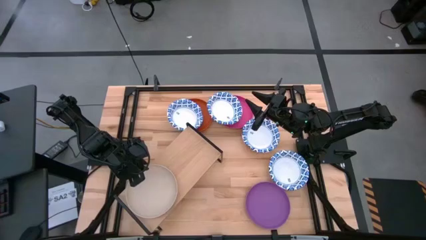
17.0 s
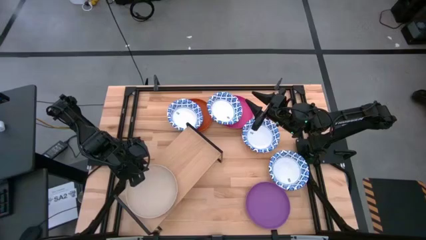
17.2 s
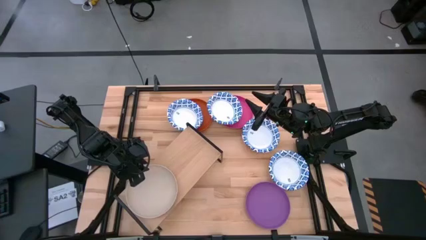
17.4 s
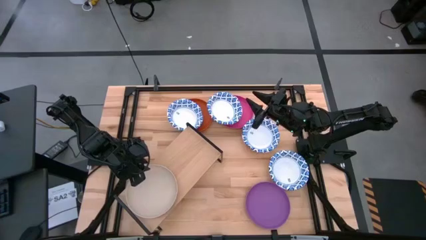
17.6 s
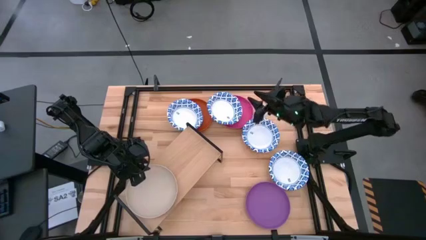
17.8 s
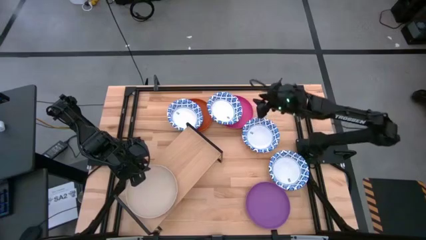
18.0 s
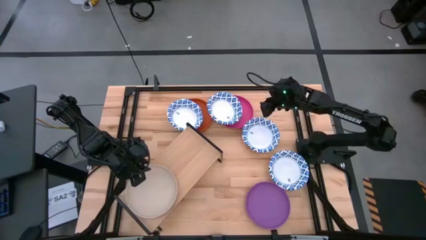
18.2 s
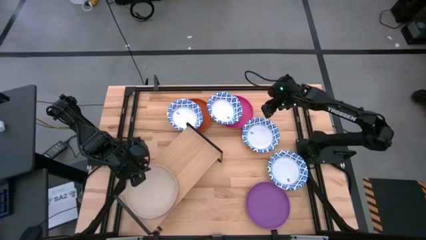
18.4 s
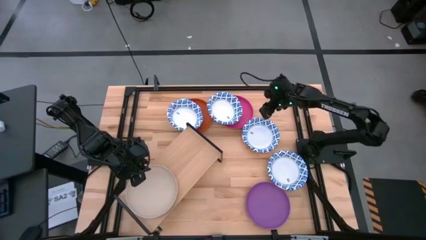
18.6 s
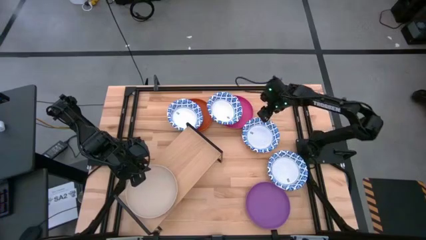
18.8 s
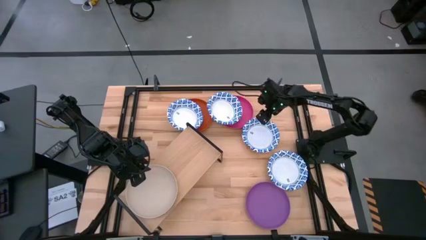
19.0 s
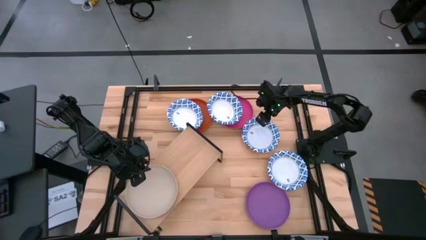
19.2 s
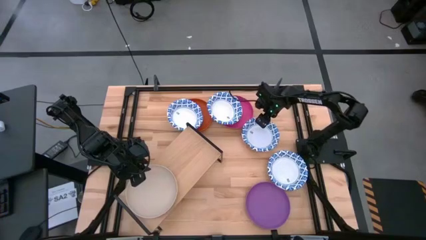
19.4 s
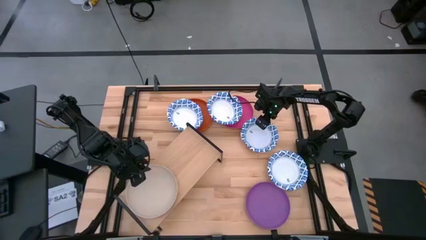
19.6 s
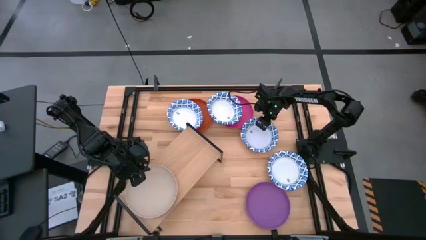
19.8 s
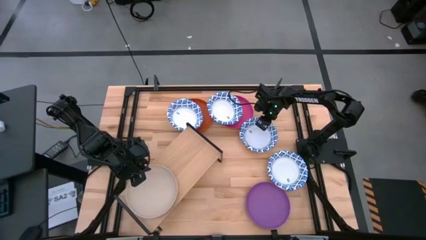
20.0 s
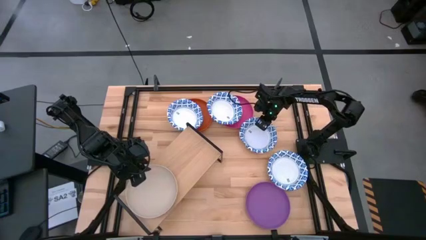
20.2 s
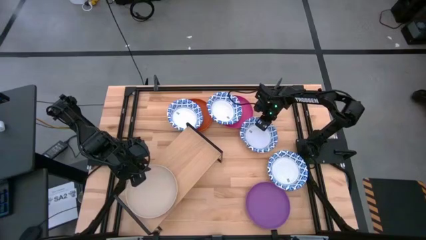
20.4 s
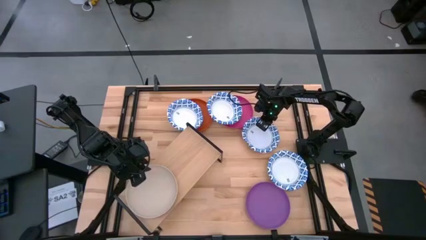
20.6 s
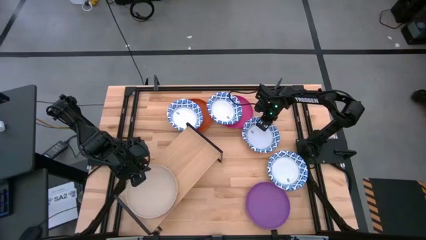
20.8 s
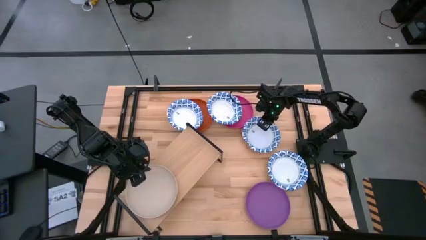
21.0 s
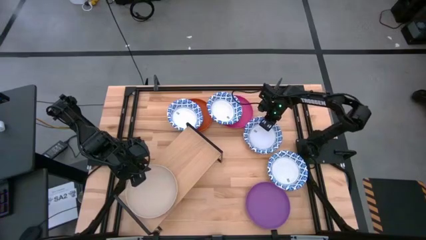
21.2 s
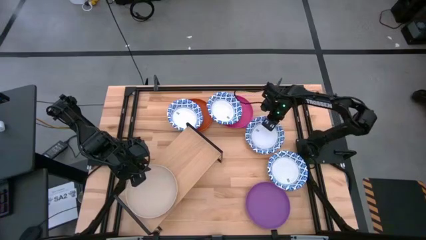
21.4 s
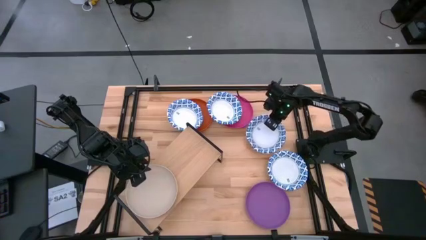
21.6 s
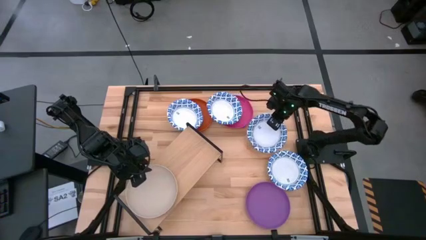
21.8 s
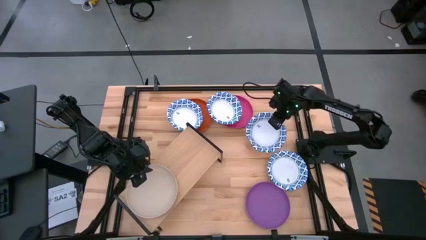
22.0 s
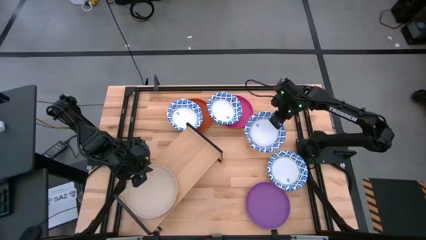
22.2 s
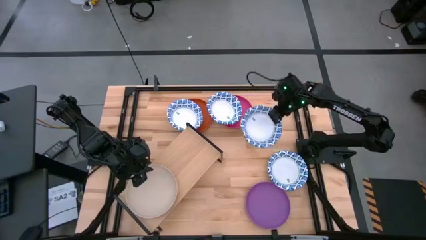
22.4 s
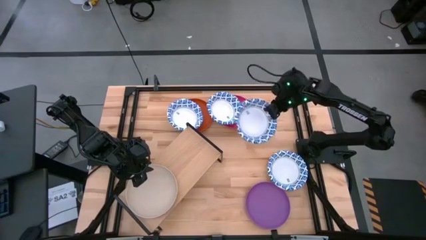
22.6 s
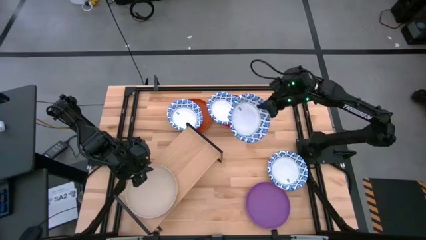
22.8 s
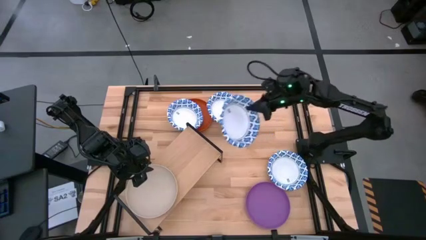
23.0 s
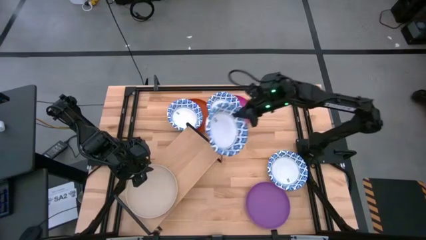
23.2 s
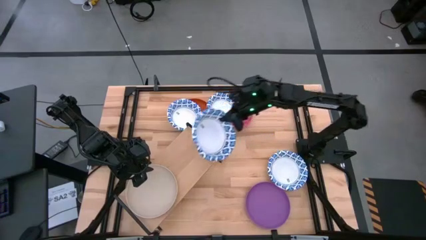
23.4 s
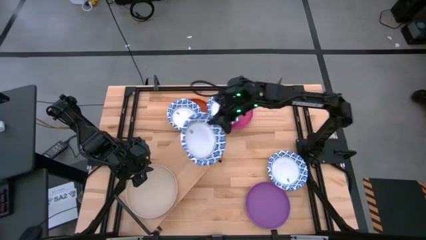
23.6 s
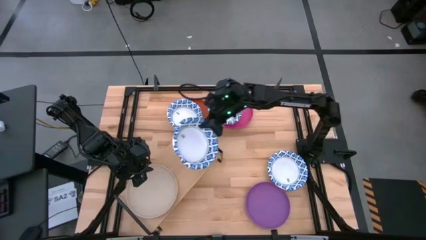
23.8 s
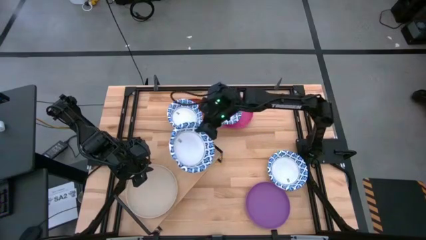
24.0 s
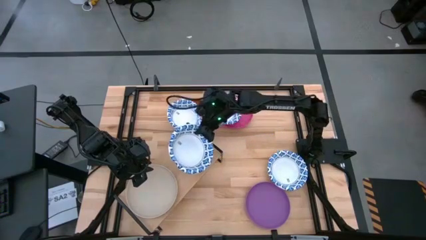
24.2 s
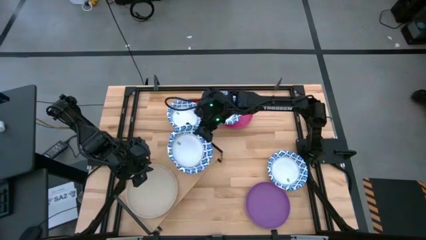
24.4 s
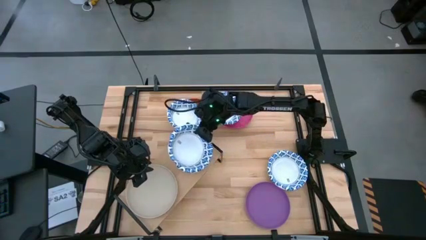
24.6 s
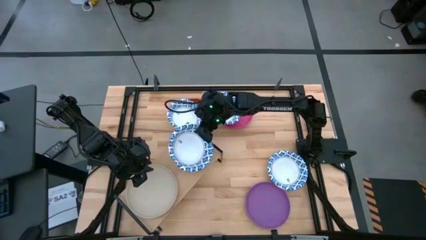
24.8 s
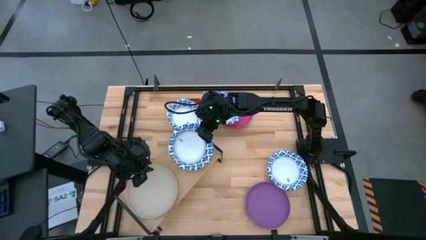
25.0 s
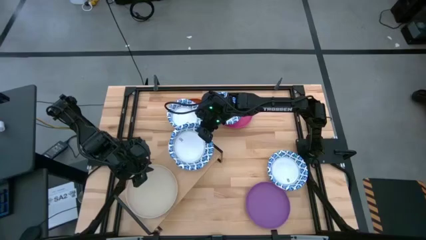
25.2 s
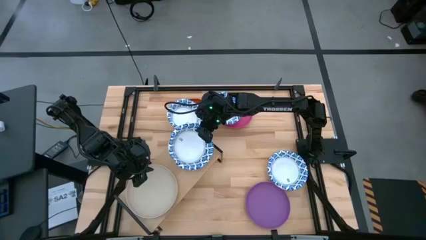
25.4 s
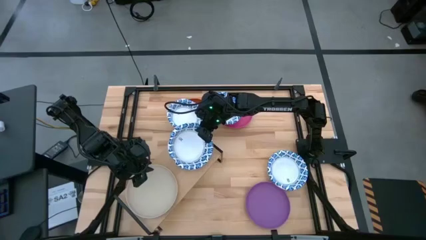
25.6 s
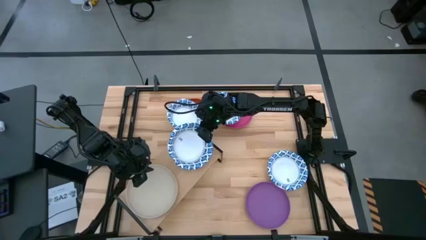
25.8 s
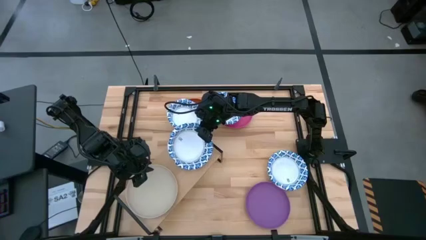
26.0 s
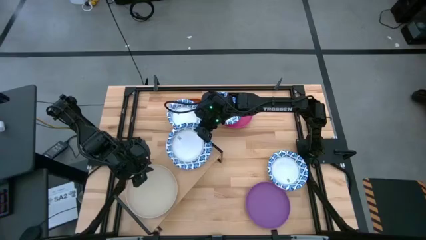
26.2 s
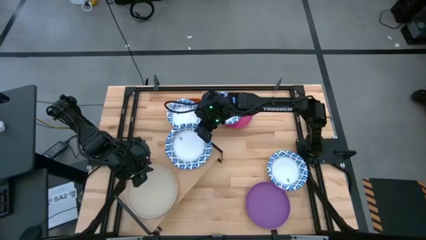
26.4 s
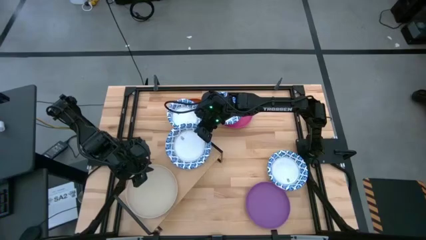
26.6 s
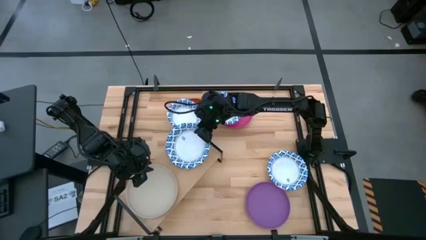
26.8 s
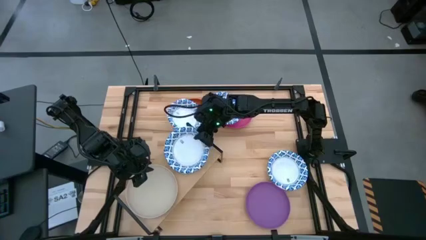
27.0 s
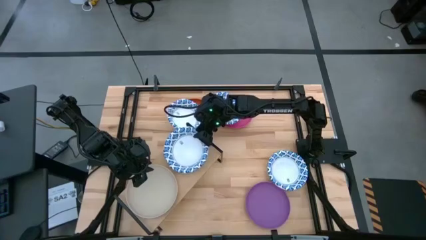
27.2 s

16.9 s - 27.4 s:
Task: Place and stack plates onto a shelf
Put the white bowl on the shelf

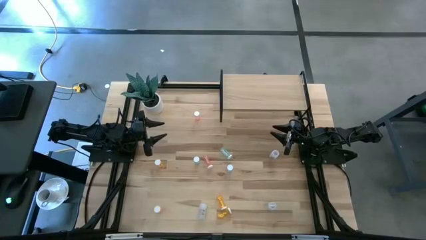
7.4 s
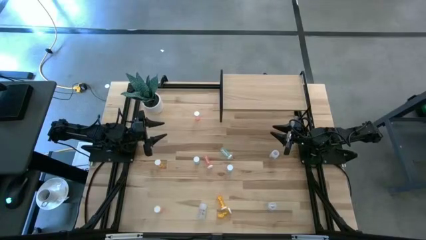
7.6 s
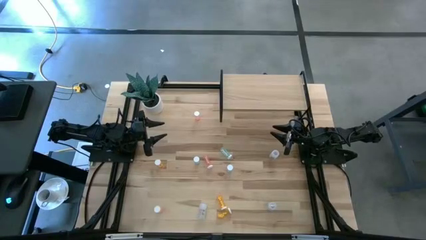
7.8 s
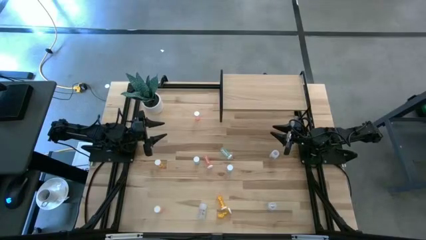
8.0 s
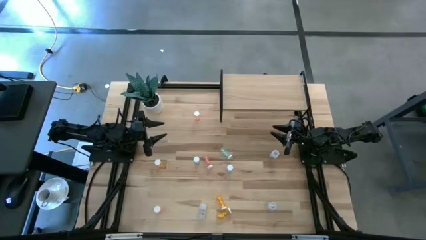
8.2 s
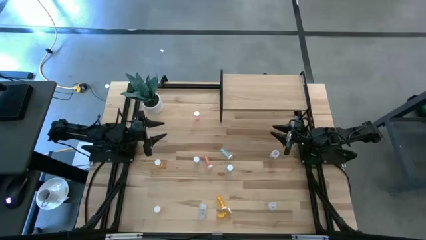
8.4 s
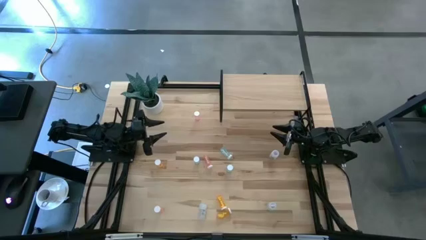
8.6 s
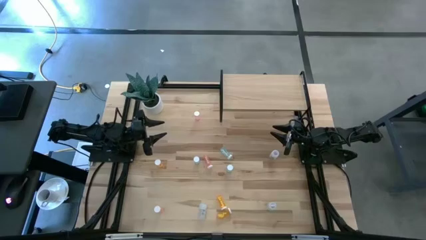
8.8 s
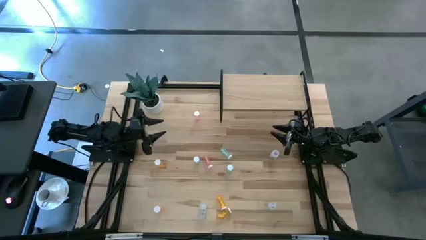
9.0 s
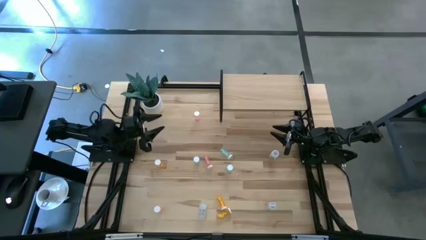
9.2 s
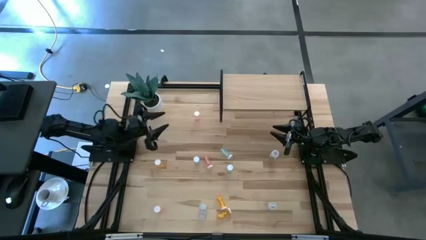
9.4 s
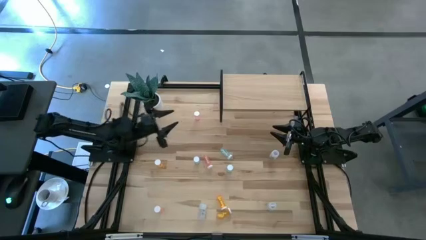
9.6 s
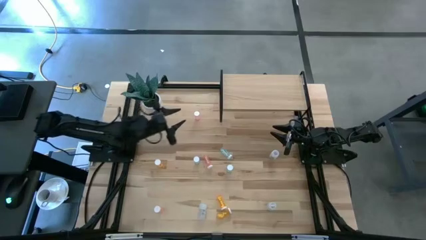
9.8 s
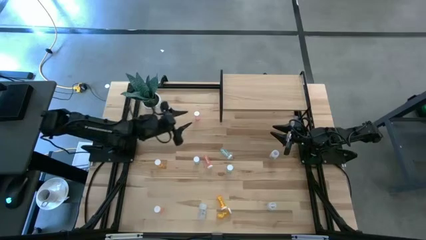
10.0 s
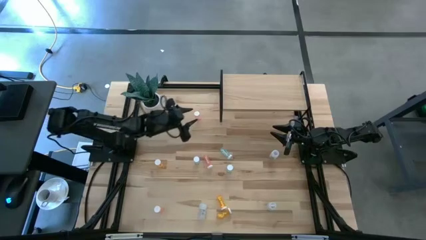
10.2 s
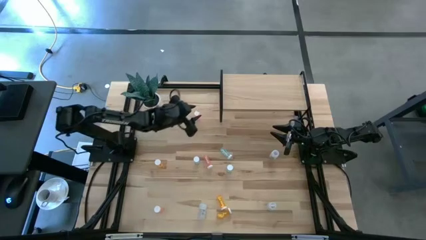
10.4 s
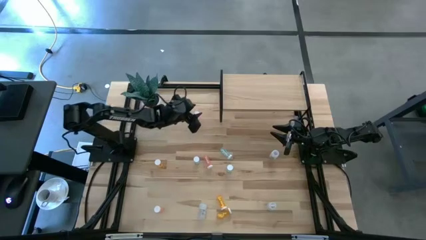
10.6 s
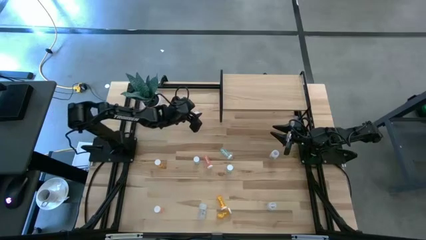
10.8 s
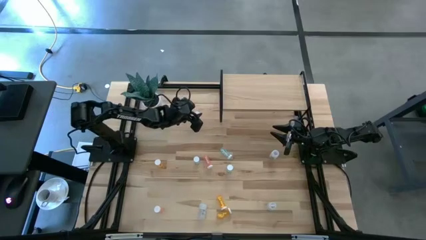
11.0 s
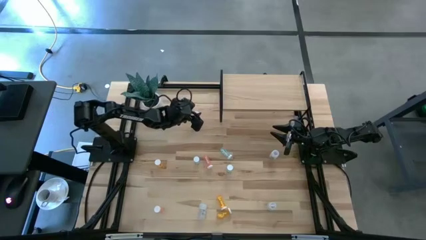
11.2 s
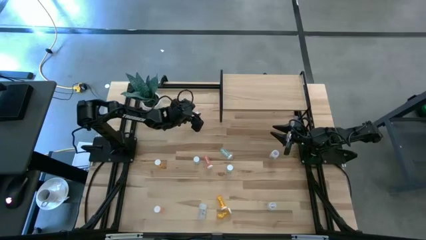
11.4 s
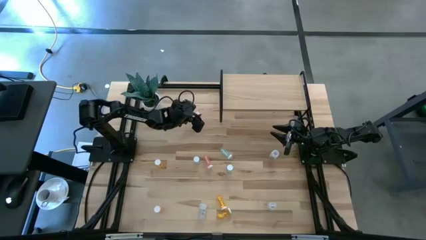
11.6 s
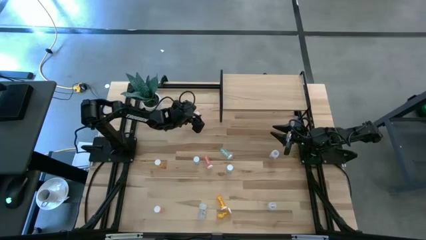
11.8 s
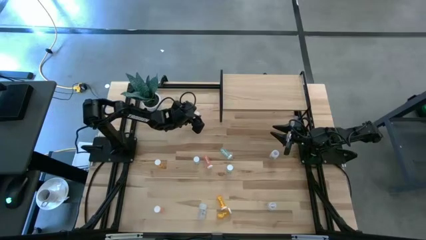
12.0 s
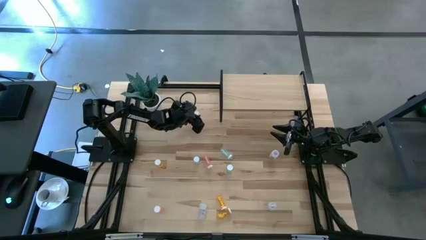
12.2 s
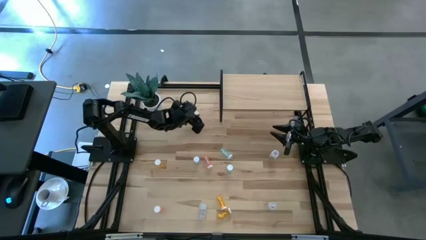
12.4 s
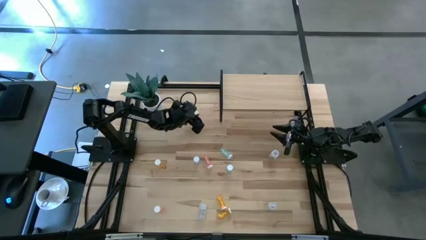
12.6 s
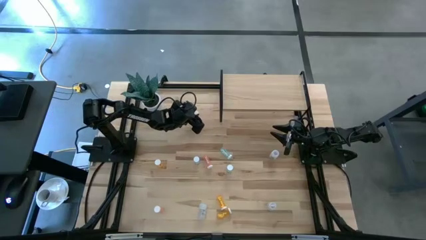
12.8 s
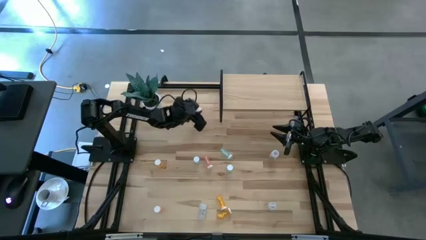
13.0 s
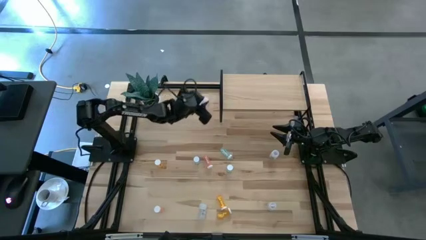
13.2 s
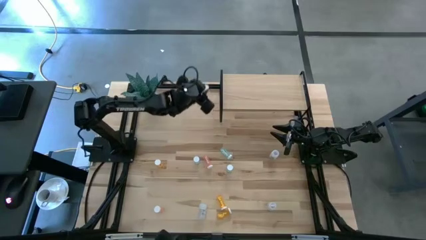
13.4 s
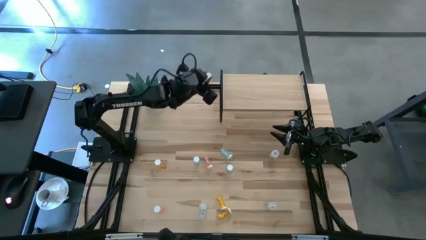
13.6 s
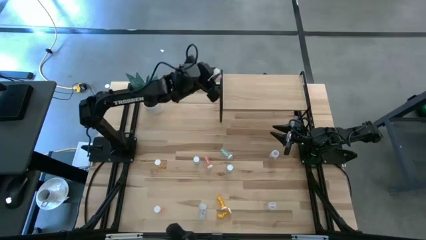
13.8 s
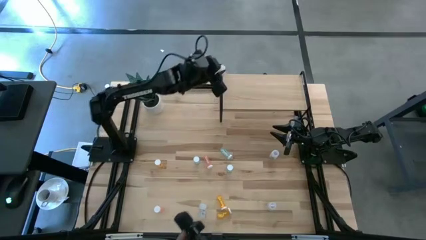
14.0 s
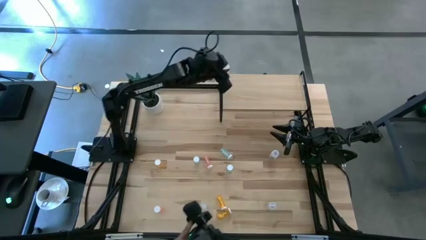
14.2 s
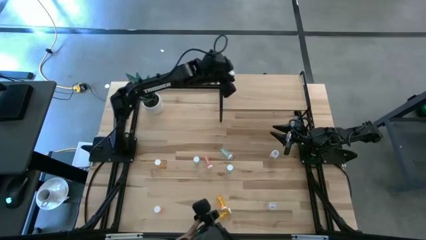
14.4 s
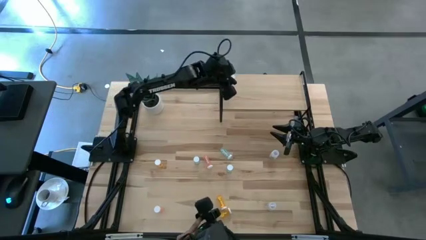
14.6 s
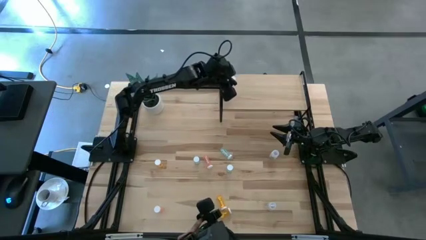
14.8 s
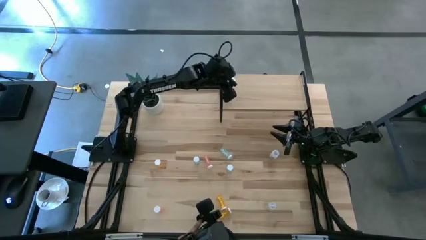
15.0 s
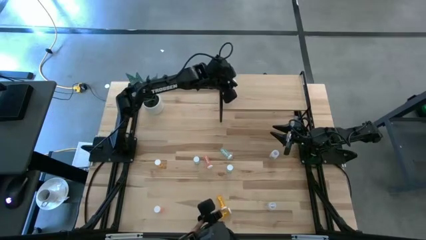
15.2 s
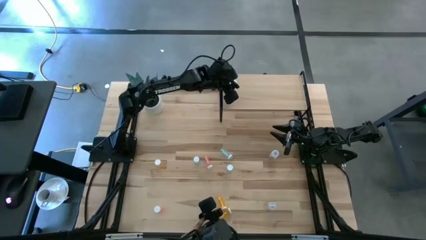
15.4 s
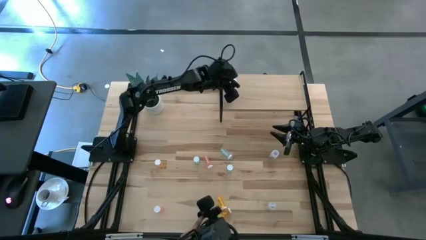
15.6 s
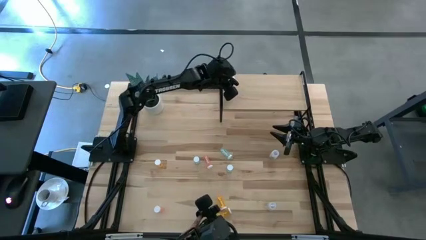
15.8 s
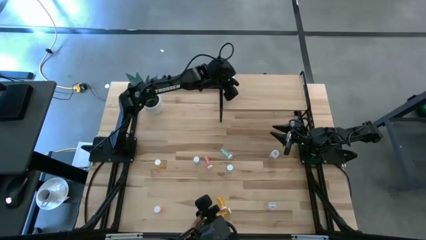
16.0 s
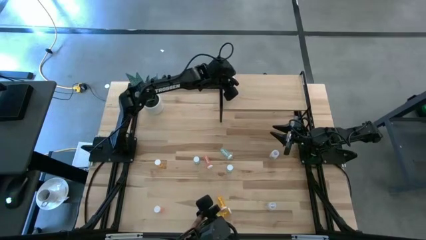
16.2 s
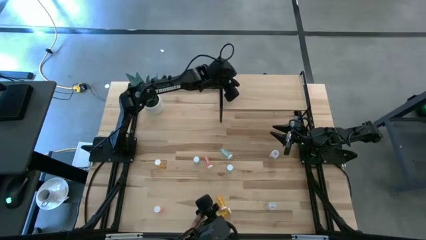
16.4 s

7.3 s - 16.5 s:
Task: Pick and place medicine bottles onto shelf by color
Put the top red pill bottle on the shelf
